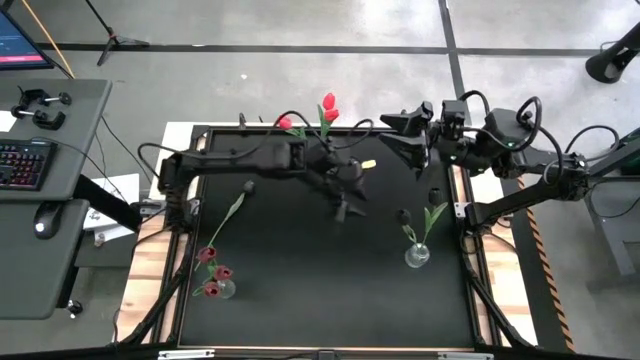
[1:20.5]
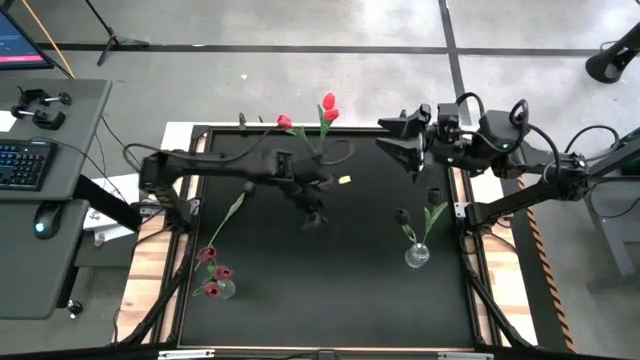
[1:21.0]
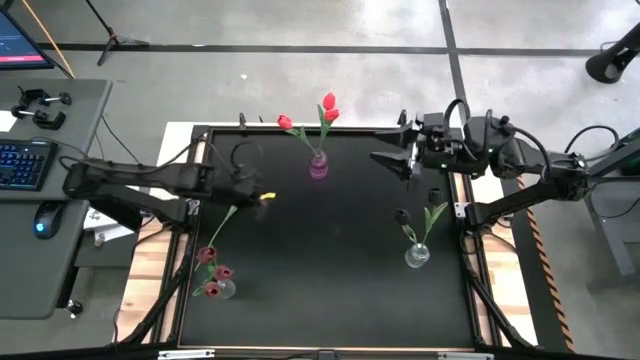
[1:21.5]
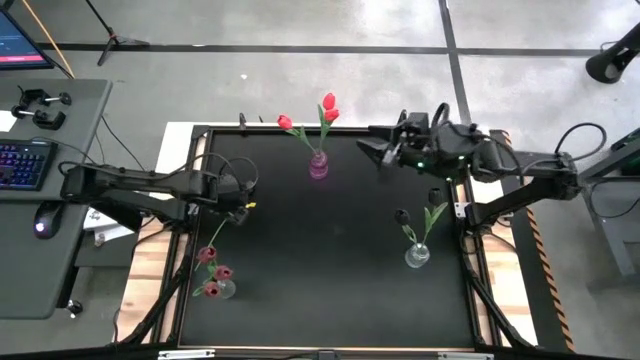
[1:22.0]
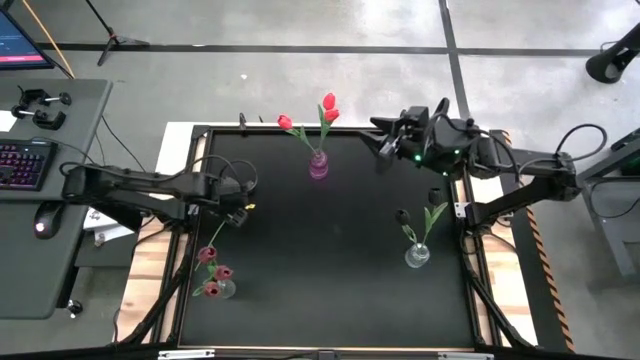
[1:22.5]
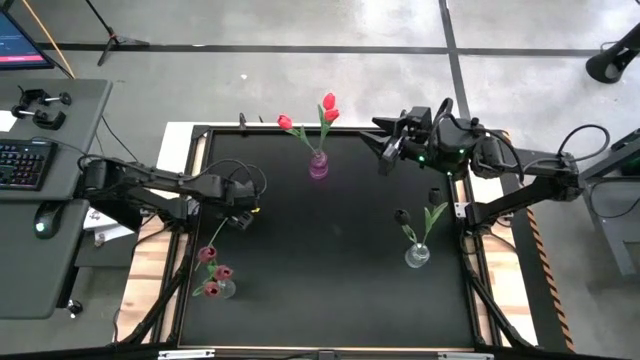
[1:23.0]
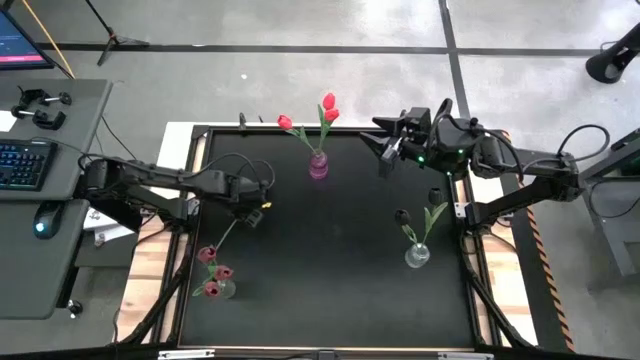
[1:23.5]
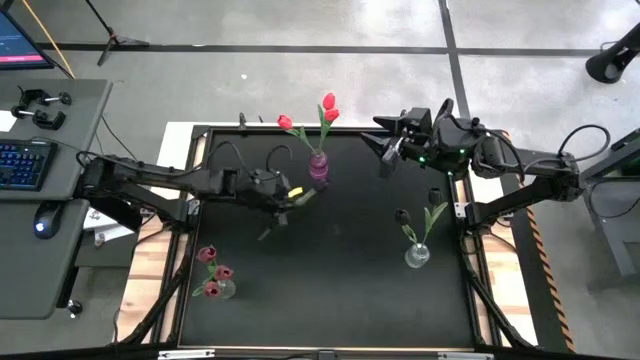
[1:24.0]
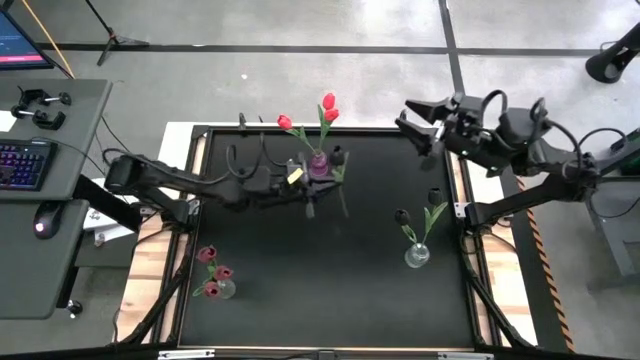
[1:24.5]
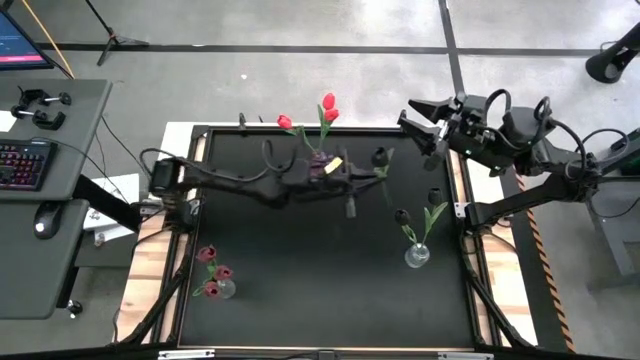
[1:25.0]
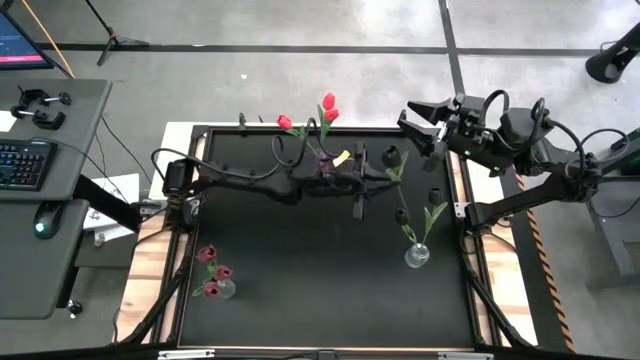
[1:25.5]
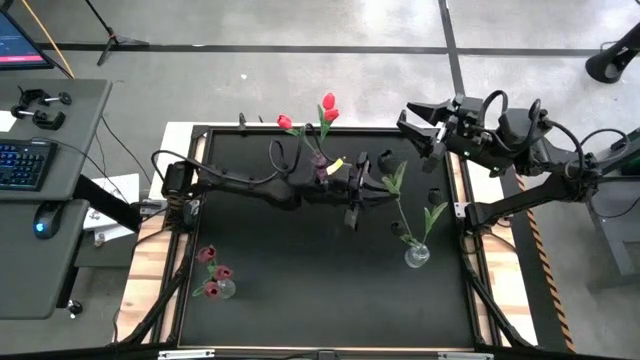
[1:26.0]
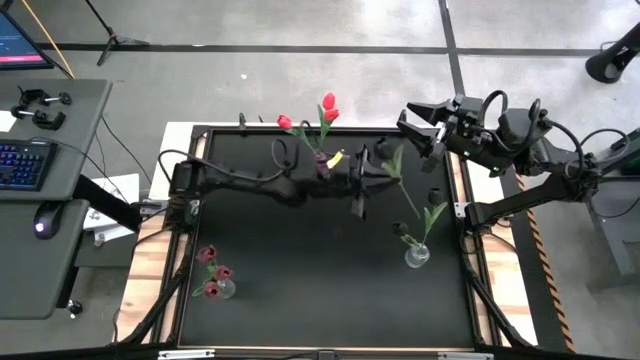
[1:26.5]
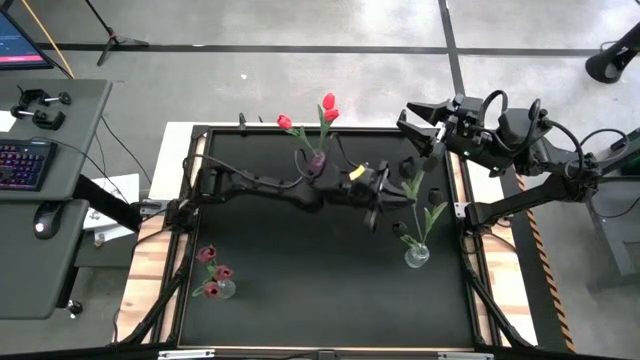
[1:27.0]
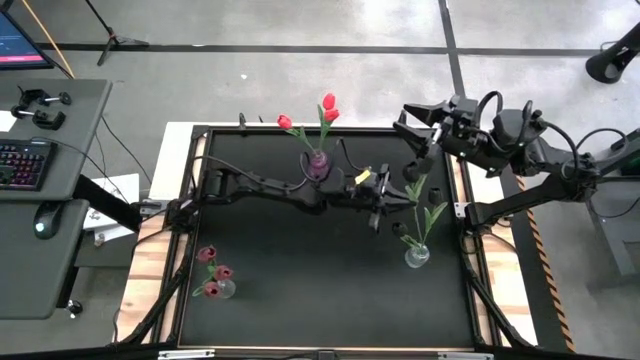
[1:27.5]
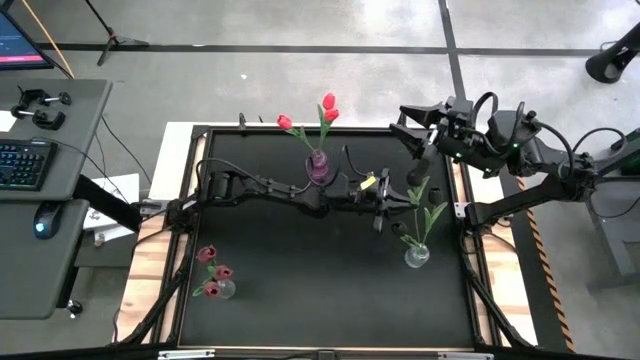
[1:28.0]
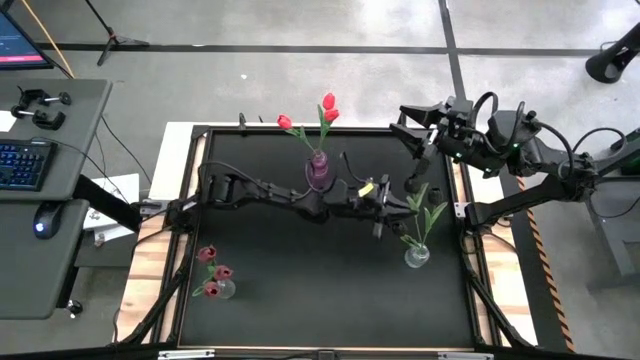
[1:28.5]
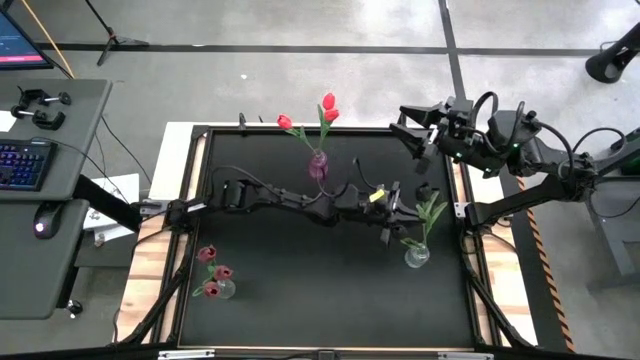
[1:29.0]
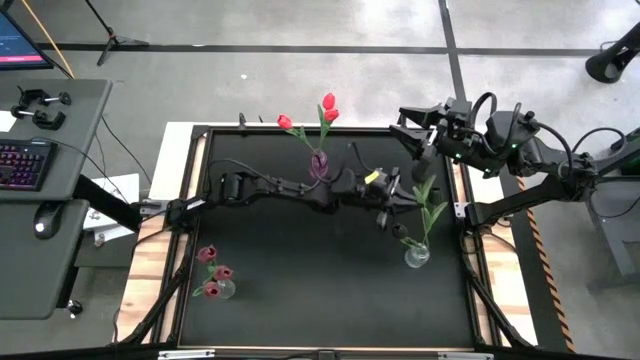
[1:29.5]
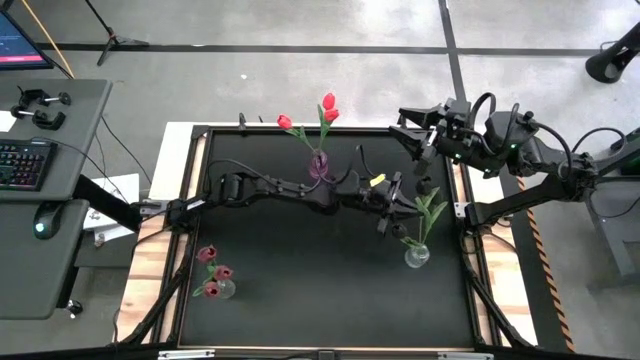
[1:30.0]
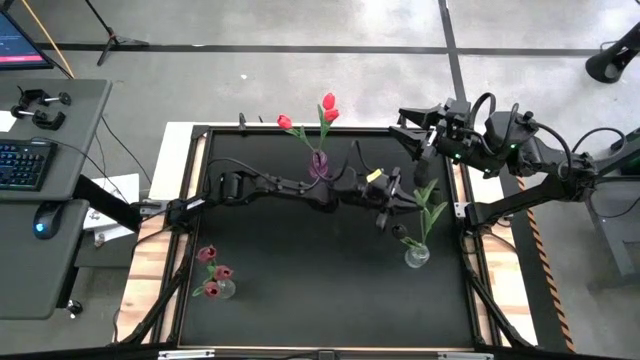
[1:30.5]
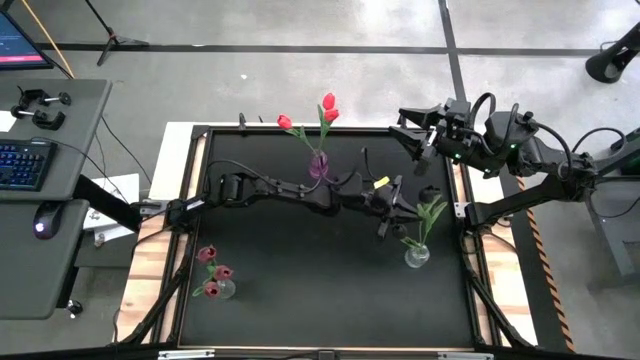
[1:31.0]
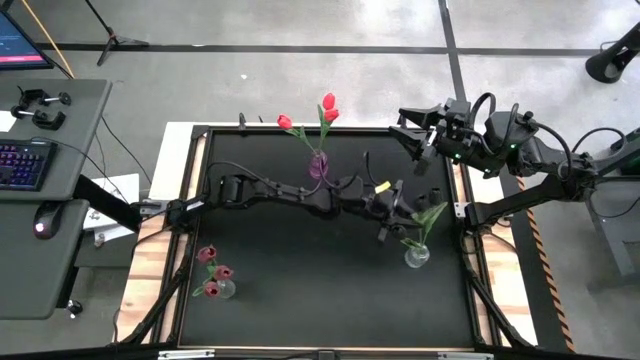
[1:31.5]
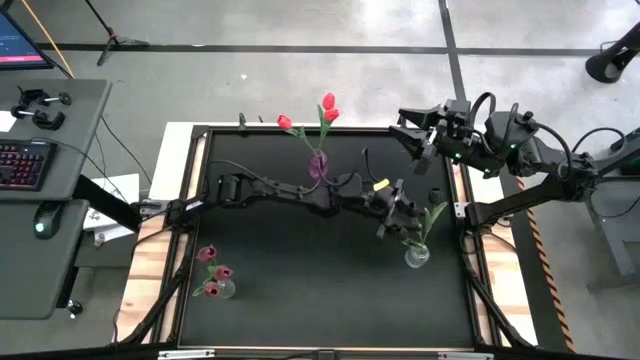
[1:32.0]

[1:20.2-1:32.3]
Task: Sort flowers into vase by color
Put the black tulip into the right transparent vase

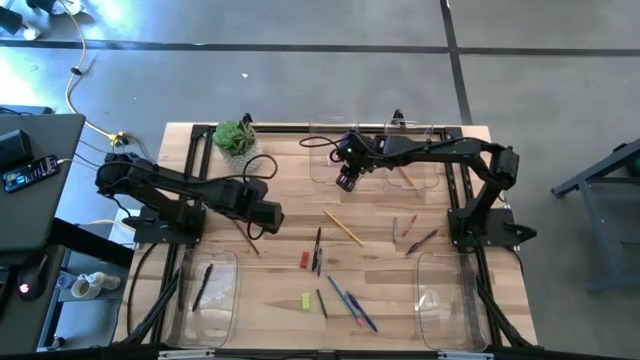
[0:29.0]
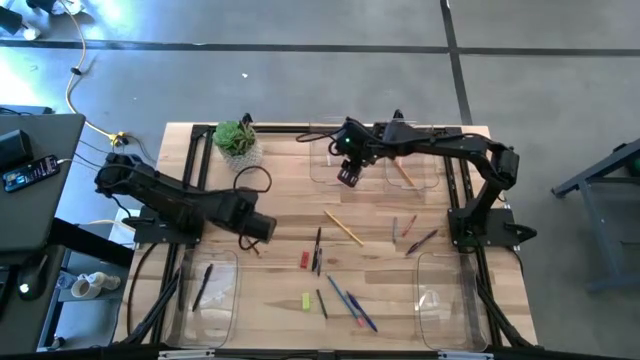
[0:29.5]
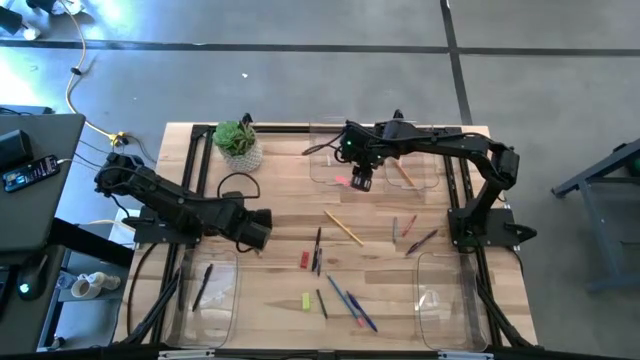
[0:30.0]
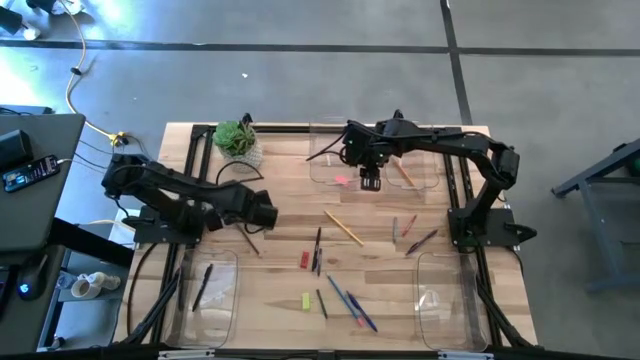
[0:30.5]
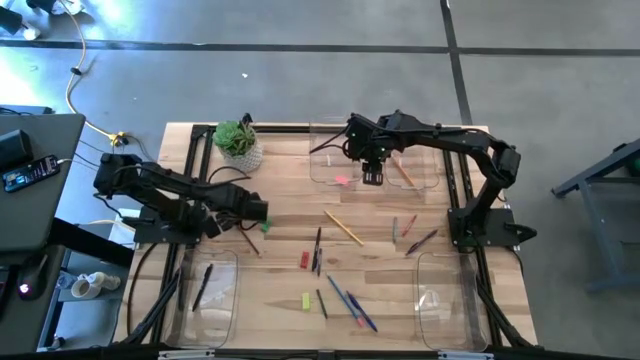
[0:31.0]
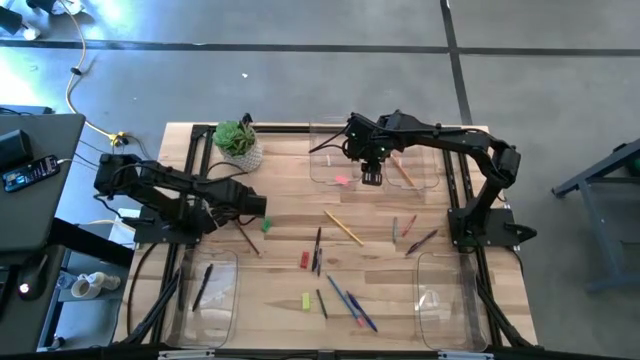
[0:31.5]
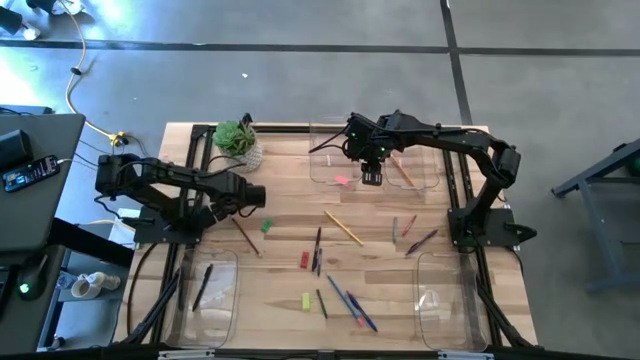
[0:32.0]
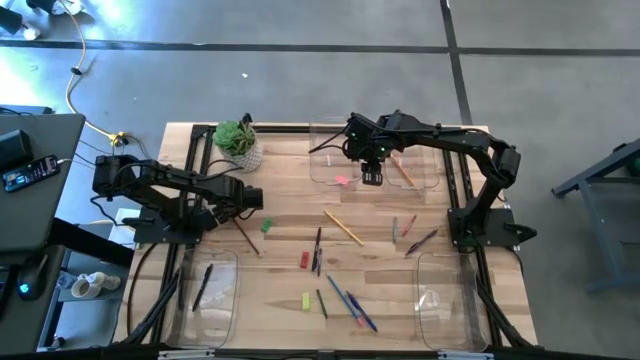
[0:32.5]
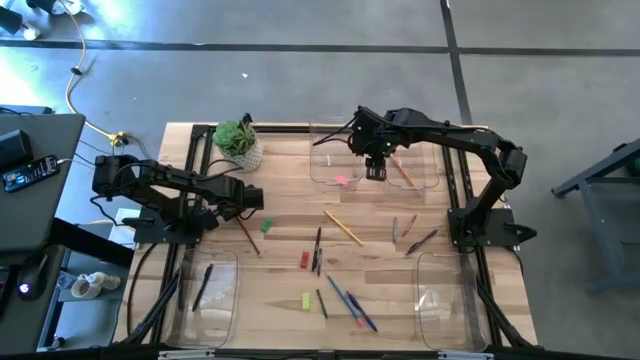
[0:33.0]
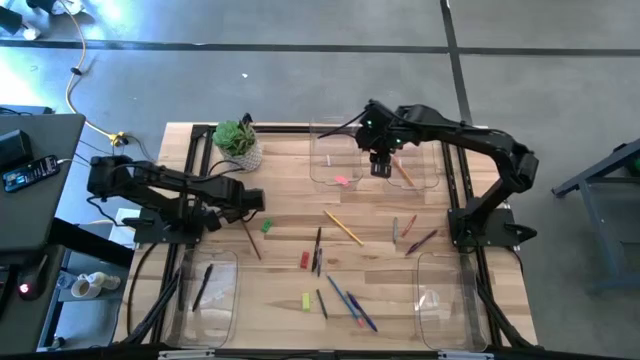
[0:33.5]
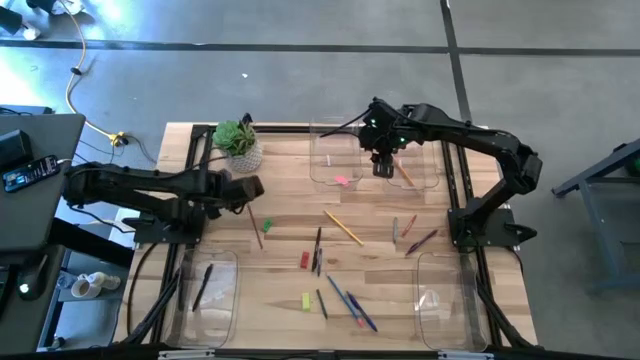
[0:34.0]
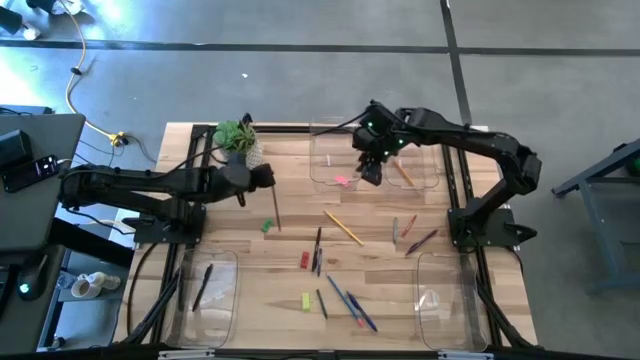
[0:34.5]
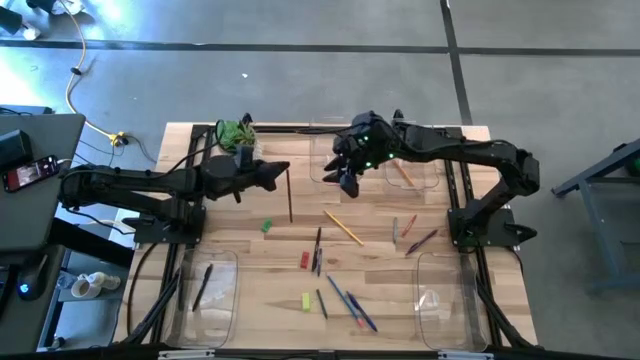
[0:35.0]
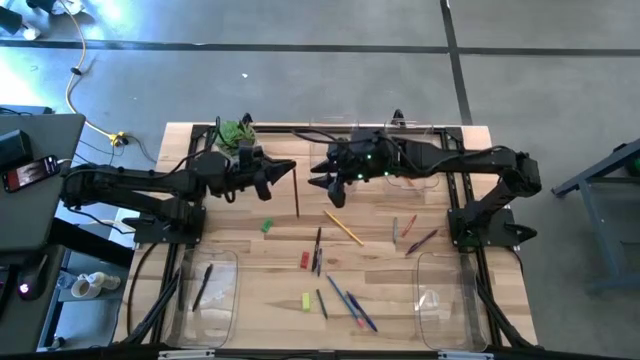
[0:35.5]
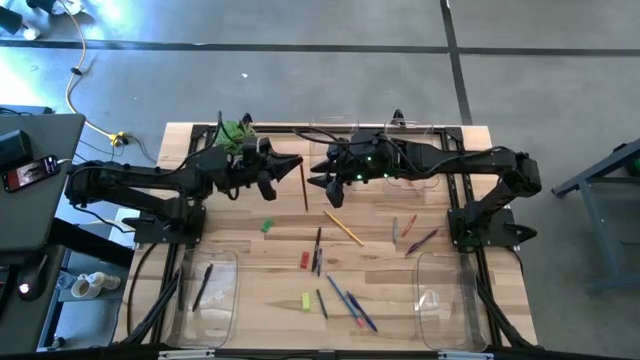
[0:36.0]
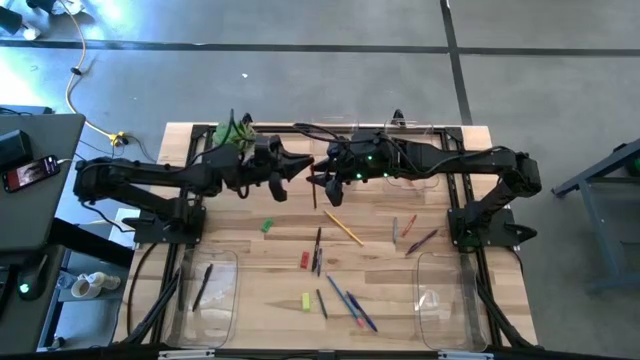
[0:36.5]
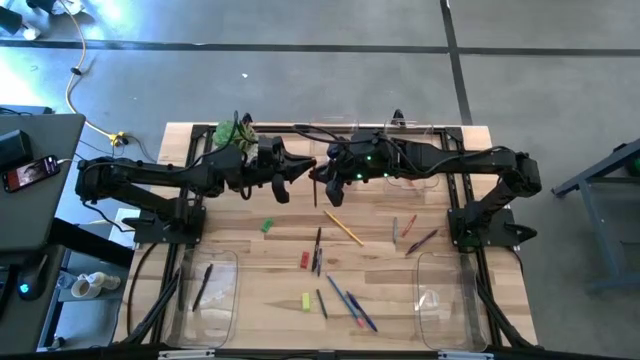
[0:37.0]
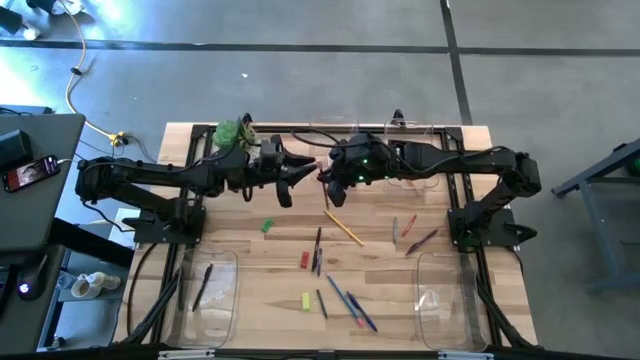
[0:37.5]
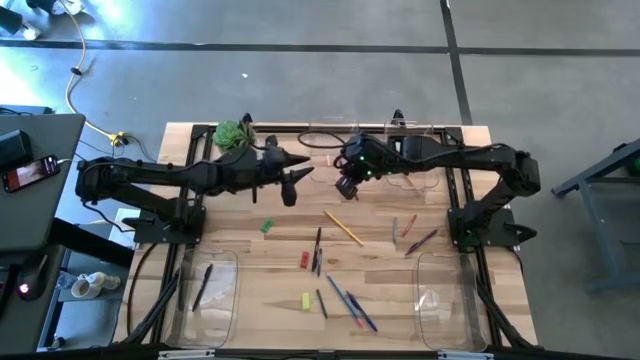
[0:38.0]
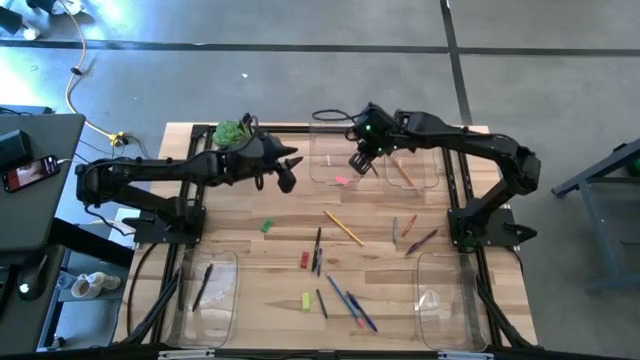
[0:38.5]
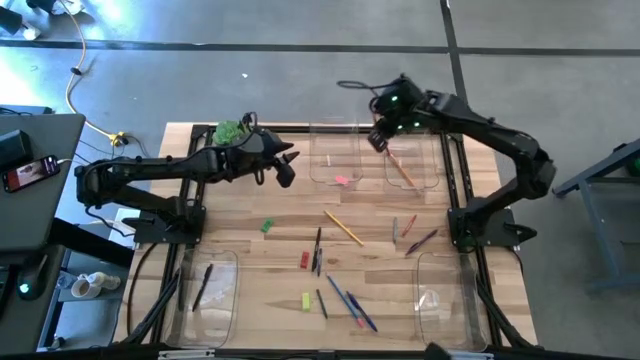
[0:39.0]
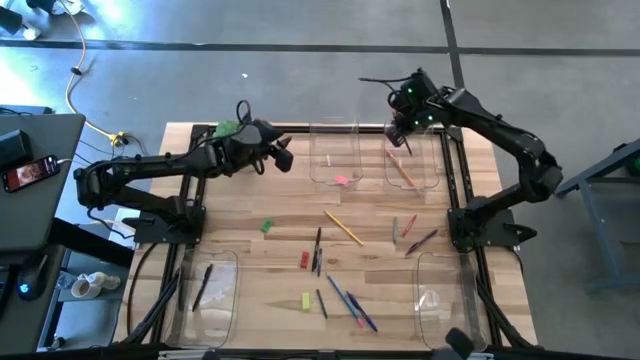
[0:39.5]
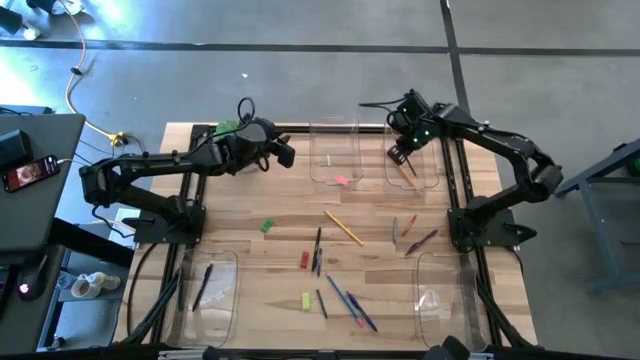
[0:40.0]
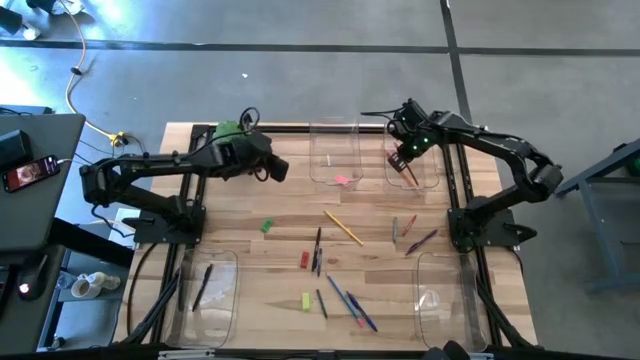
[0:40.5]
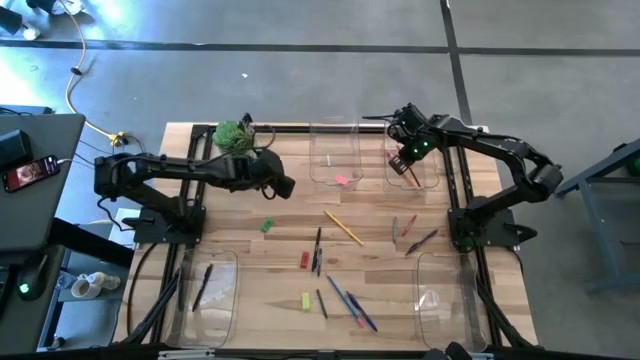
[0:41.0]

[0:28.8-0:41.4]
Task: Sort crayons/erasers/pens/pencils in bins
Put the brown pencil into the top right transparent bin
